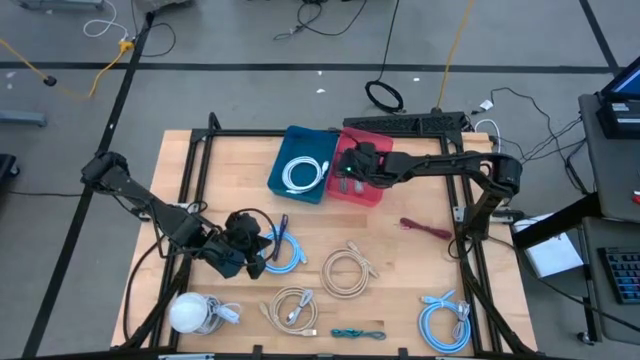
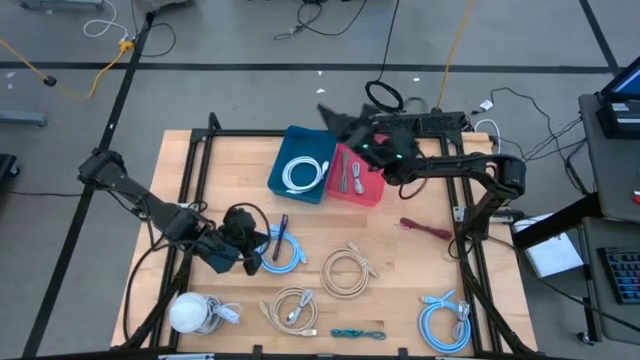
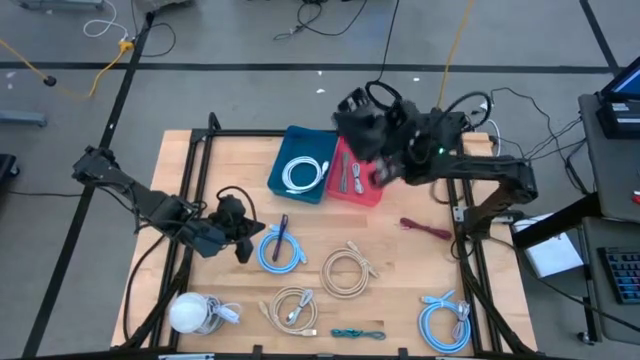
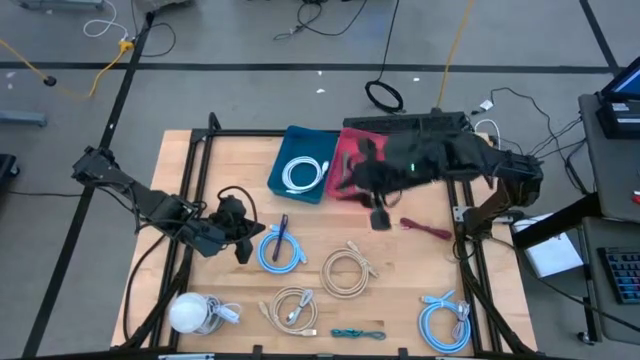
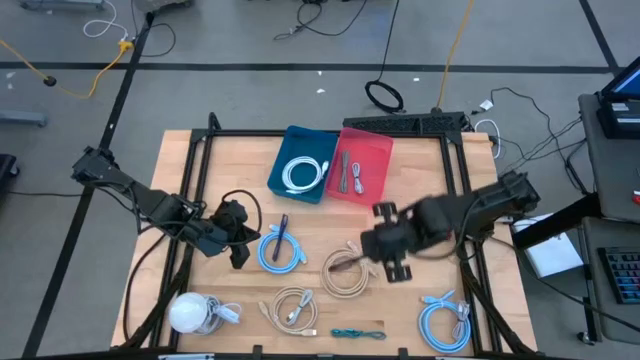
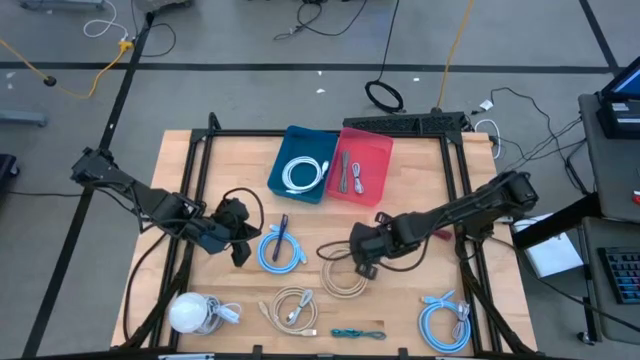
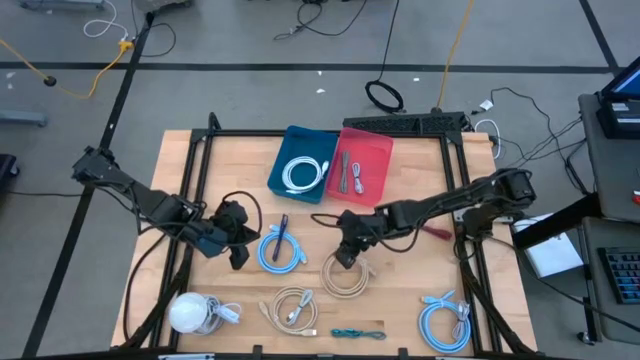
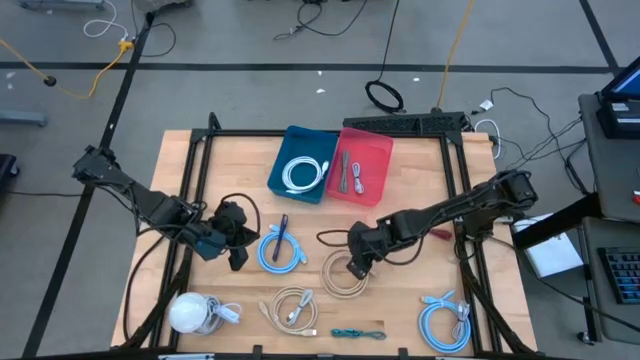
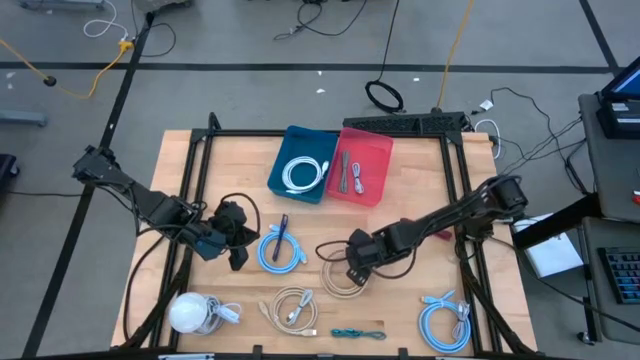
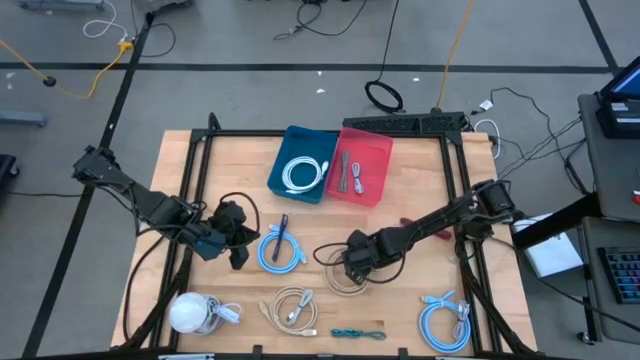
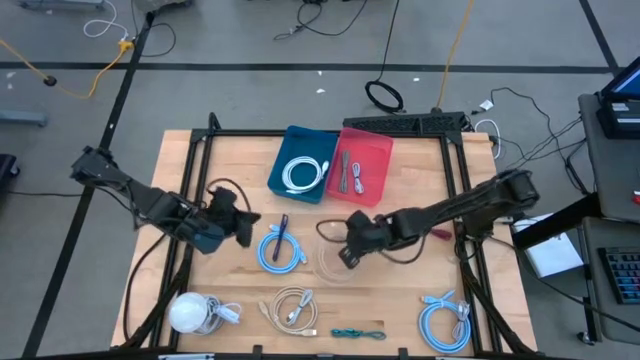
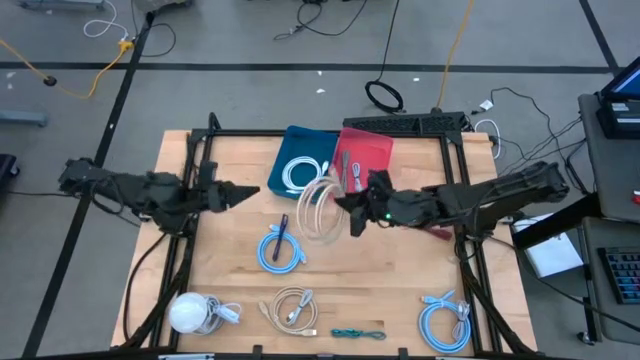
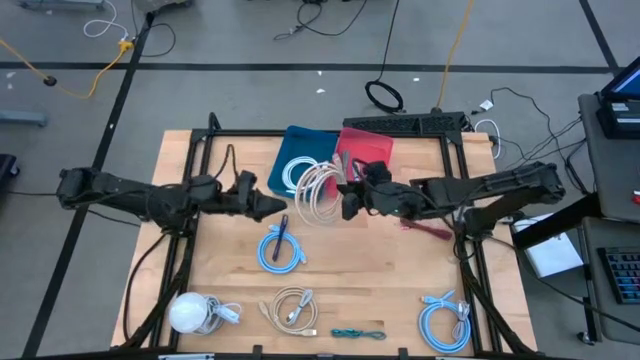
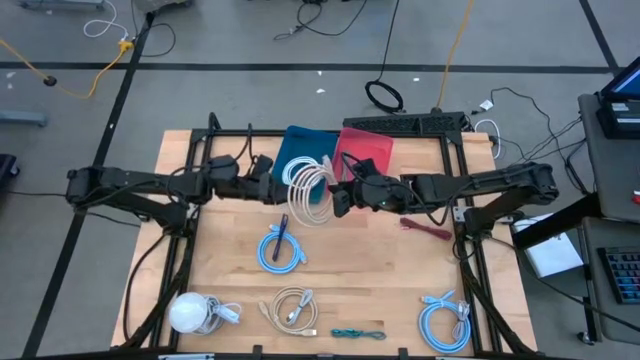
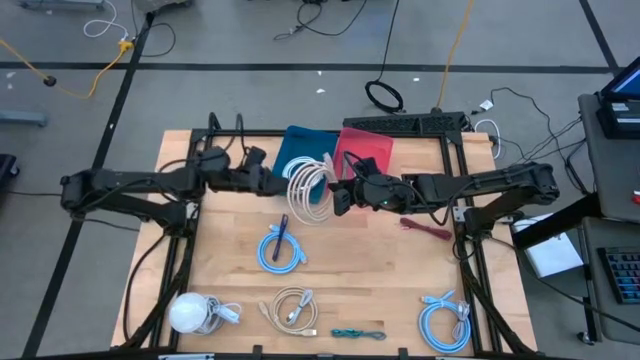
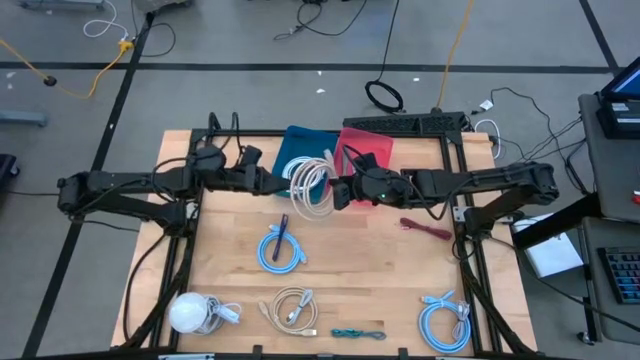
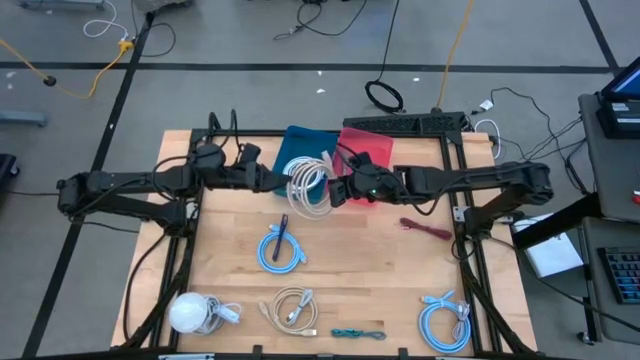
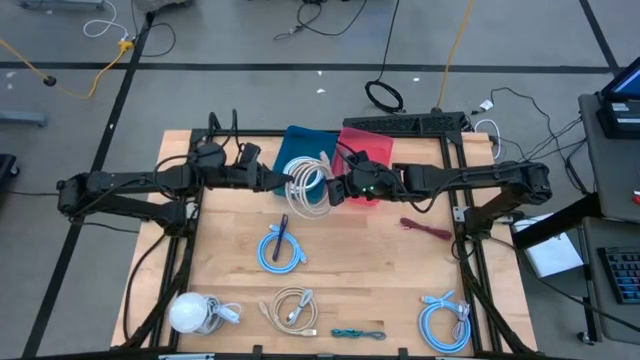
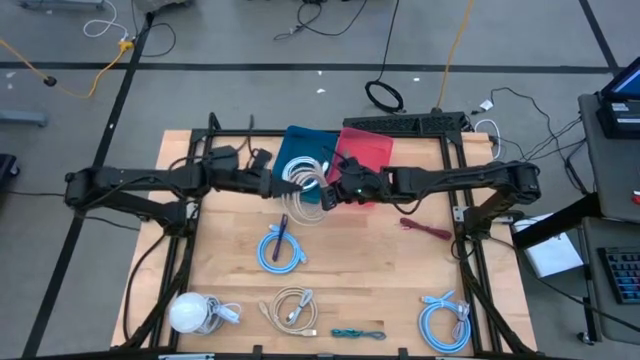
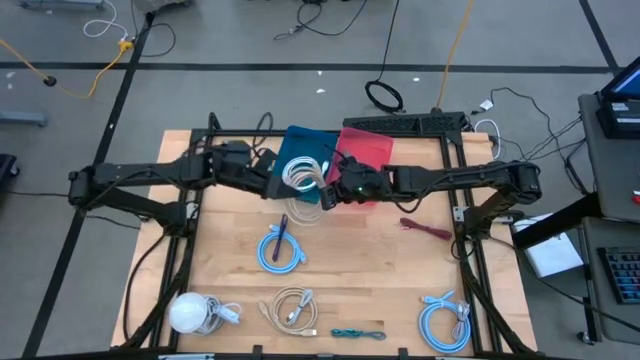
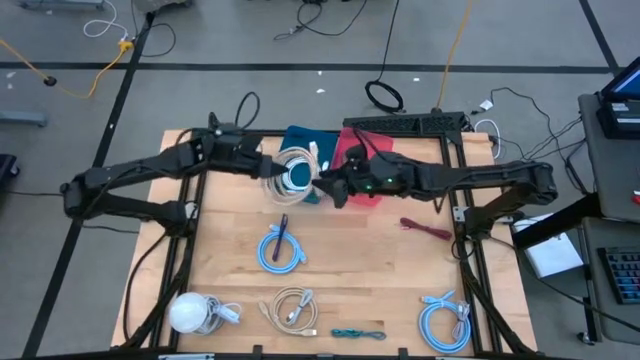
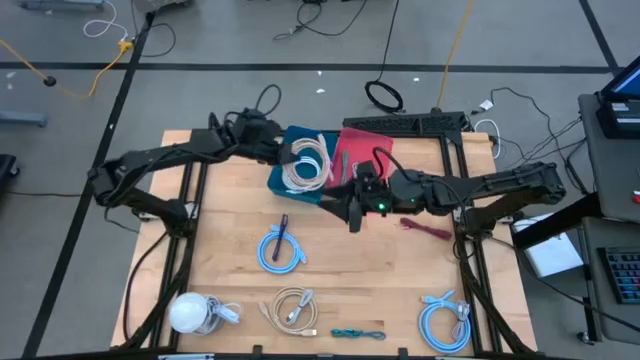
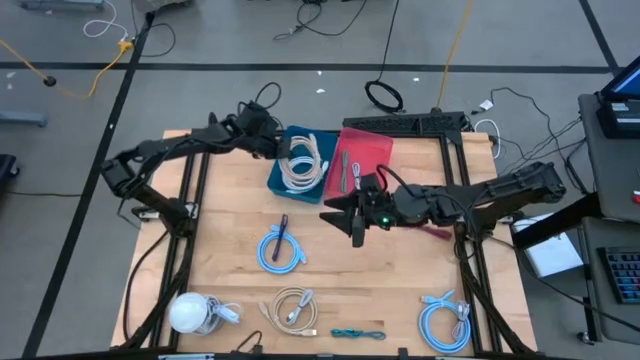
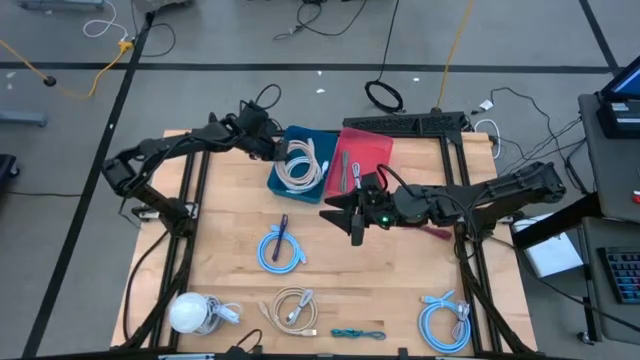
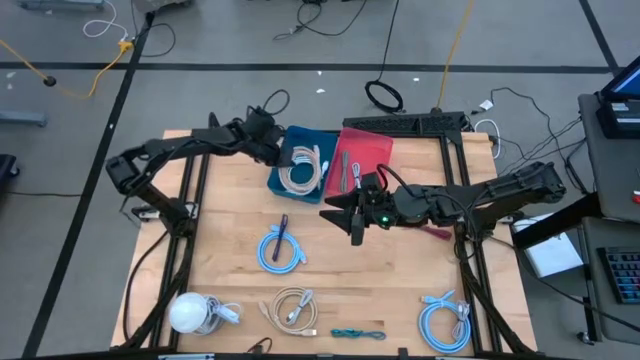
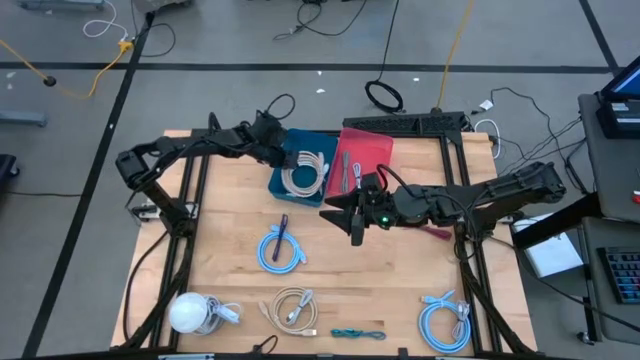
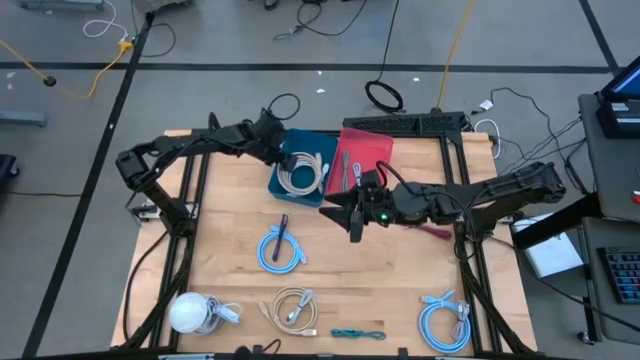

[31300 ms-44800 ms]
Task: Pick & Place USB Port
Put the large brown charger cable into the blue bin

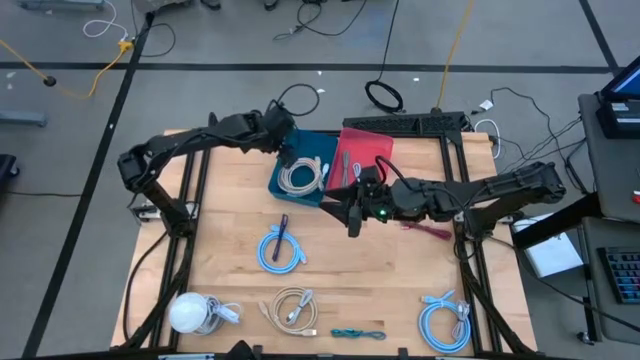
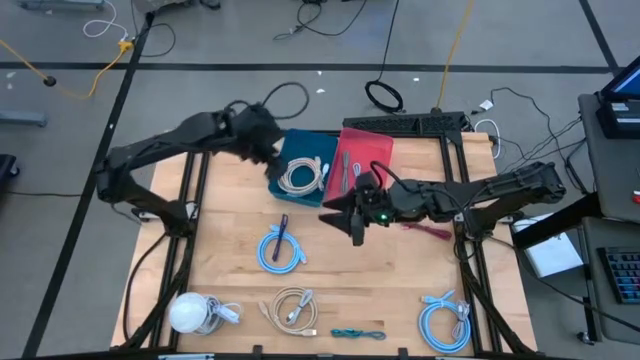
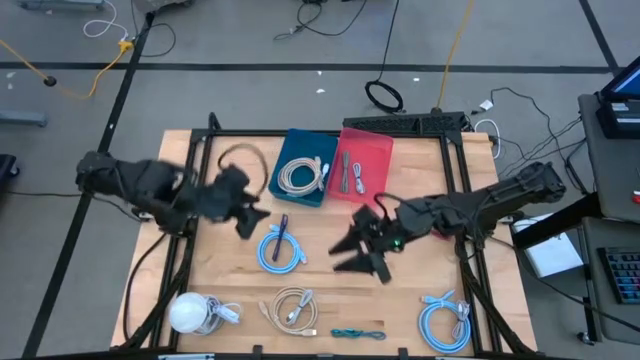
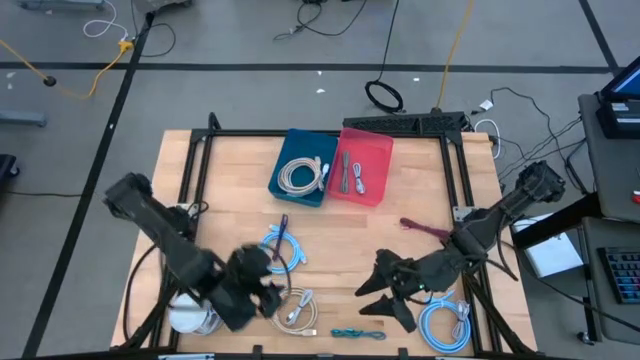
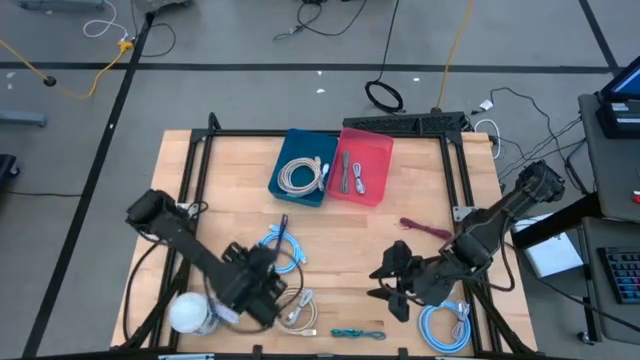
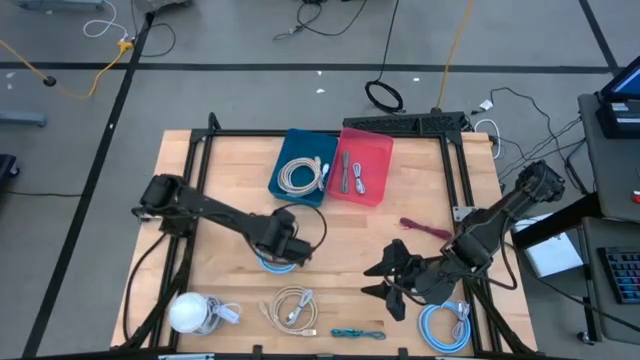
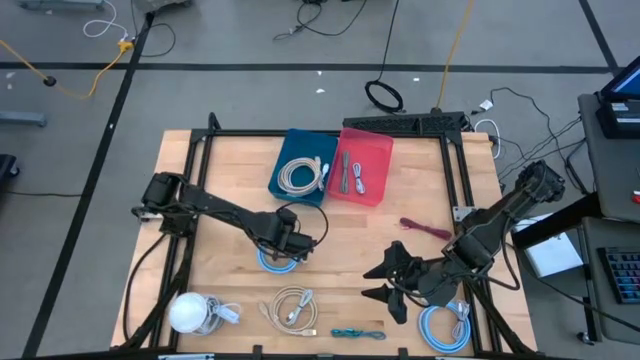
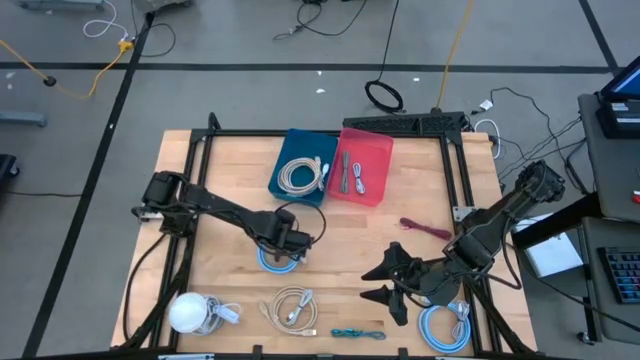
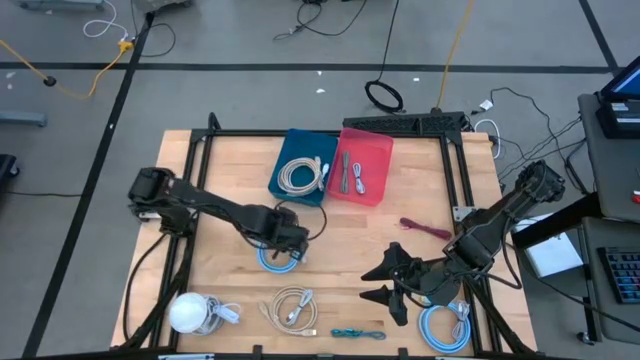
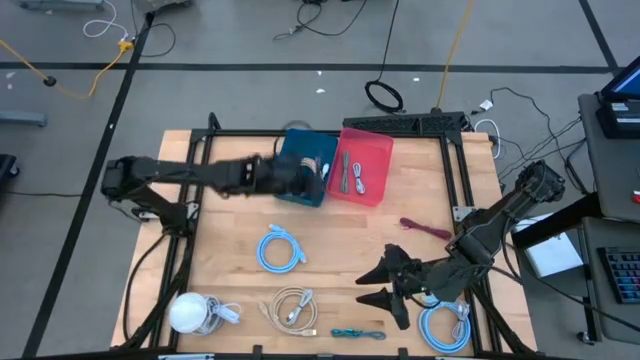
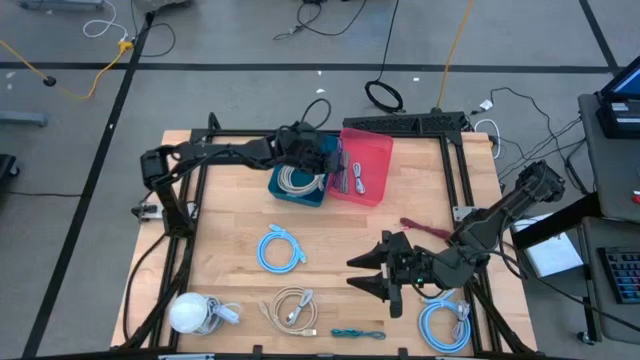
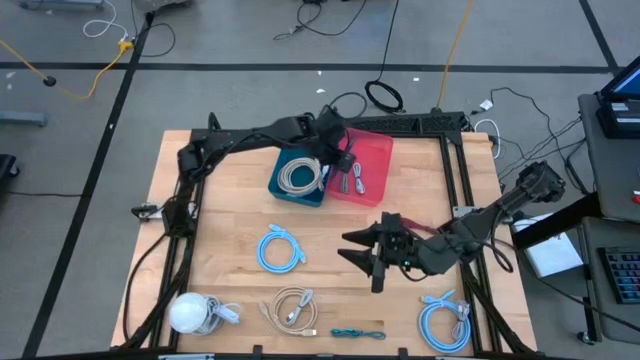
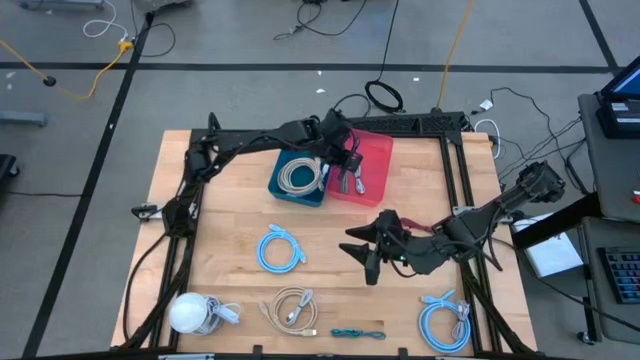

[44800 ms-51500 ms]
Put the small black and violet charger cable into the pink bin

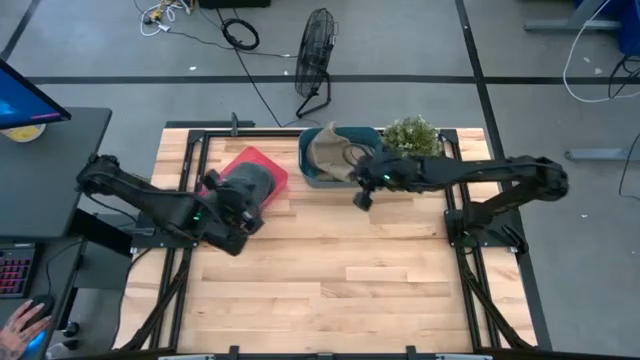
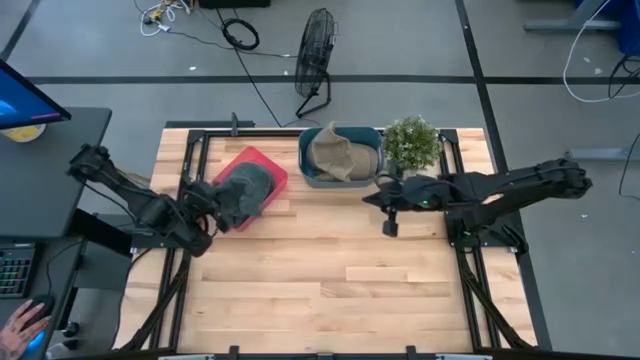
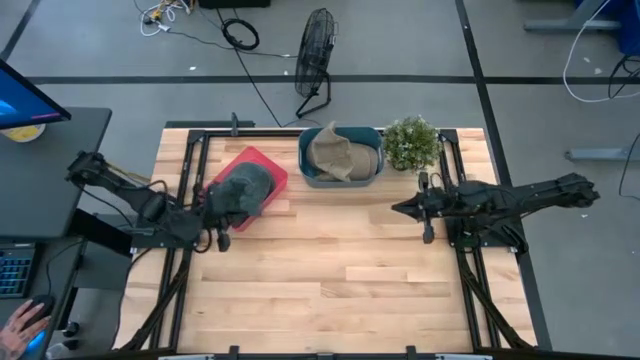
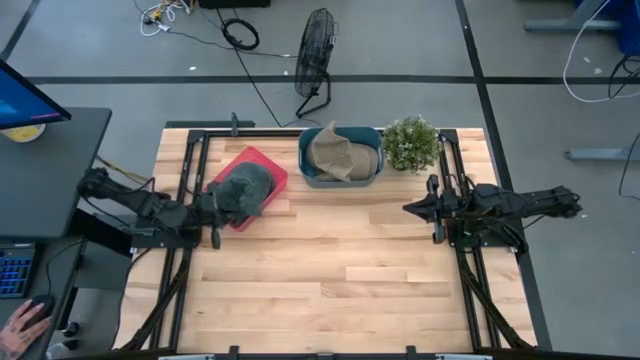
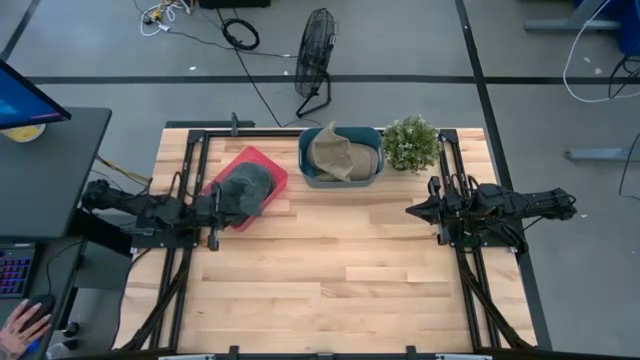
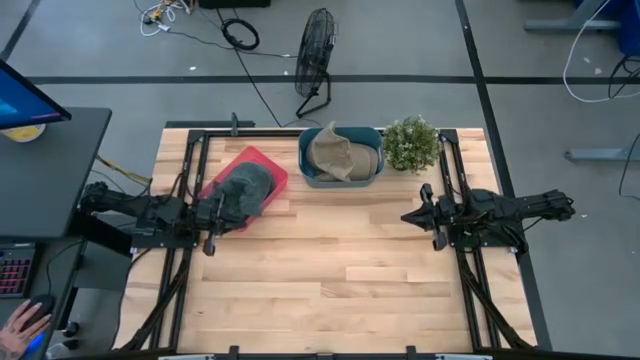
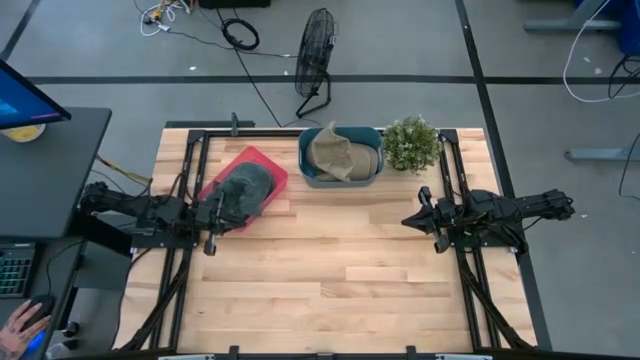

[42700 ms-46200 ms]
Task: Pick & Place hat
Return to Home Position
